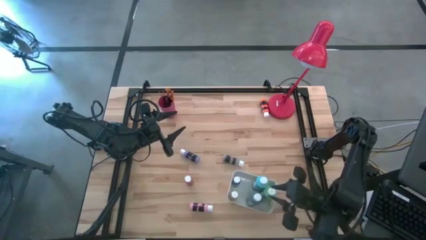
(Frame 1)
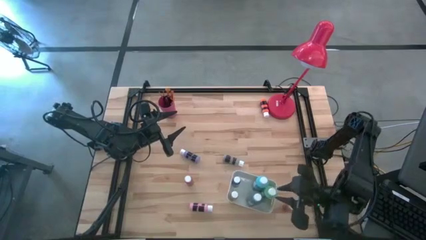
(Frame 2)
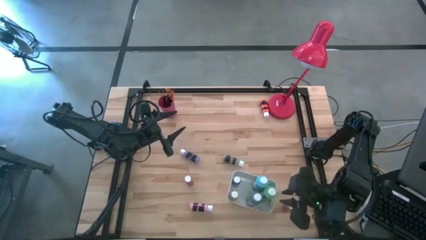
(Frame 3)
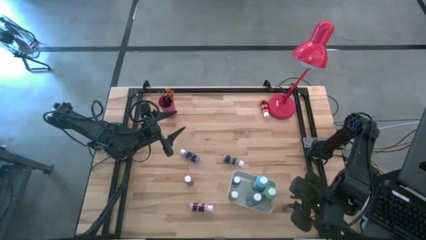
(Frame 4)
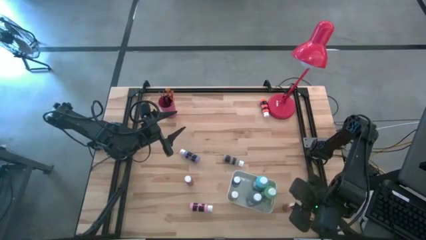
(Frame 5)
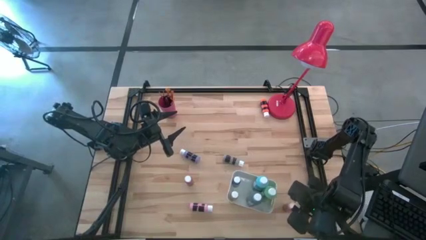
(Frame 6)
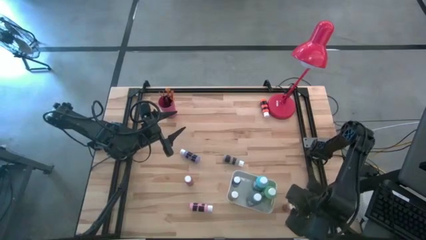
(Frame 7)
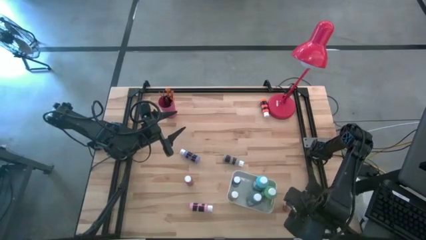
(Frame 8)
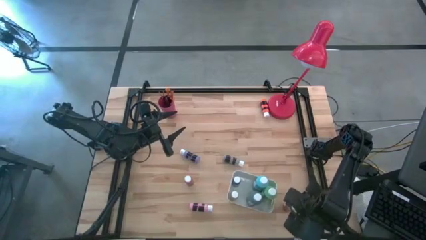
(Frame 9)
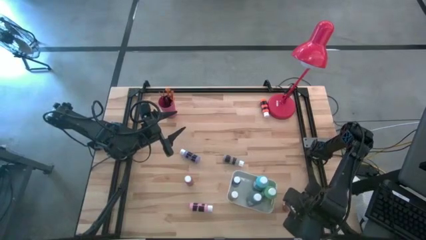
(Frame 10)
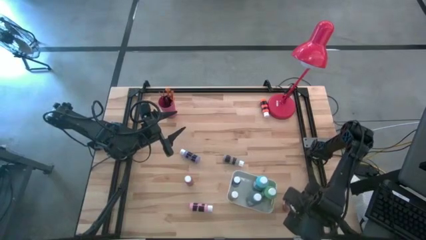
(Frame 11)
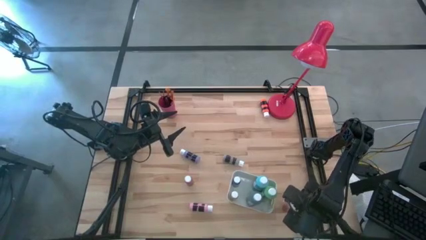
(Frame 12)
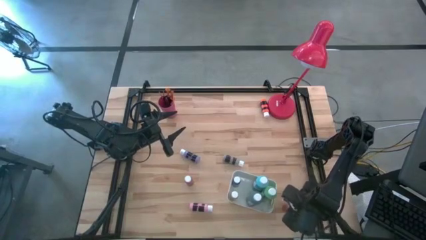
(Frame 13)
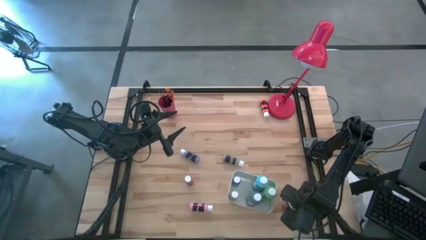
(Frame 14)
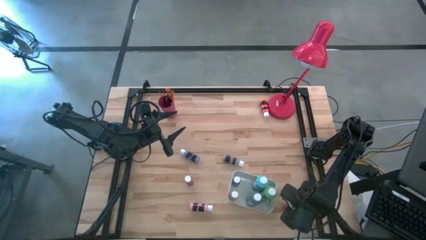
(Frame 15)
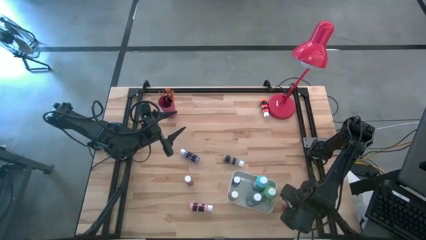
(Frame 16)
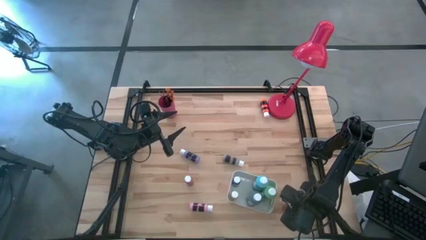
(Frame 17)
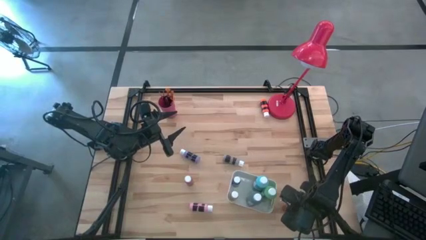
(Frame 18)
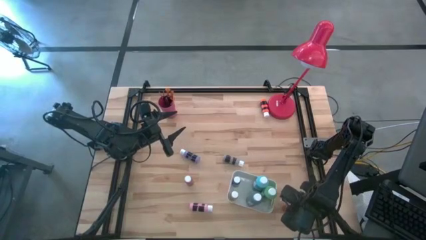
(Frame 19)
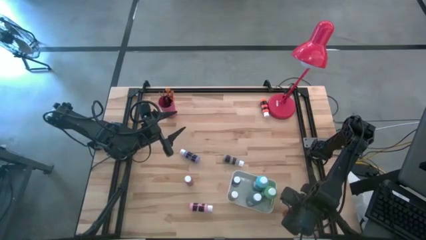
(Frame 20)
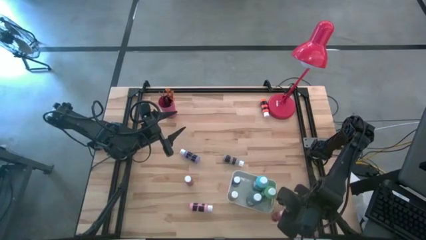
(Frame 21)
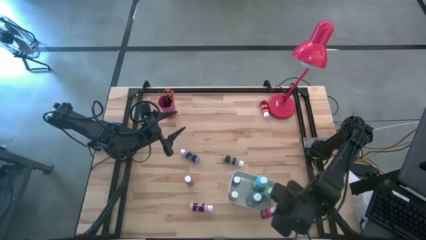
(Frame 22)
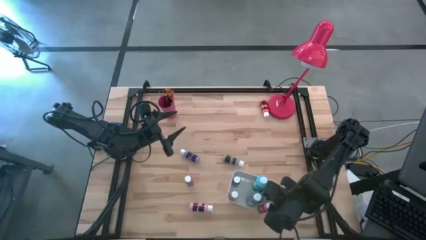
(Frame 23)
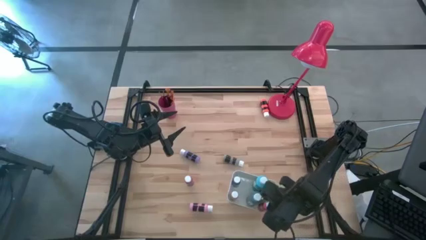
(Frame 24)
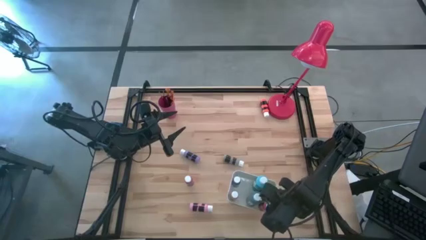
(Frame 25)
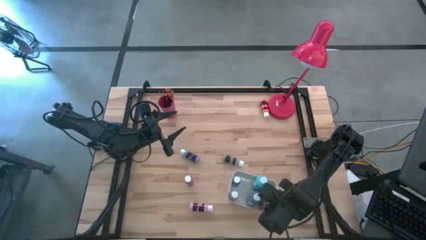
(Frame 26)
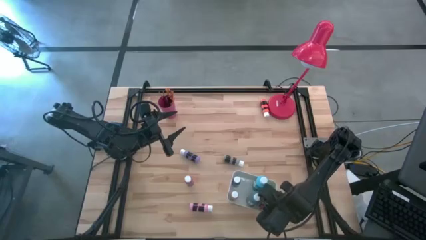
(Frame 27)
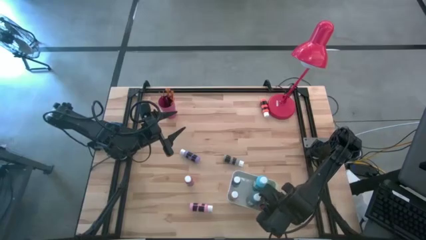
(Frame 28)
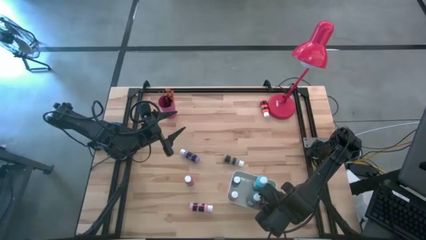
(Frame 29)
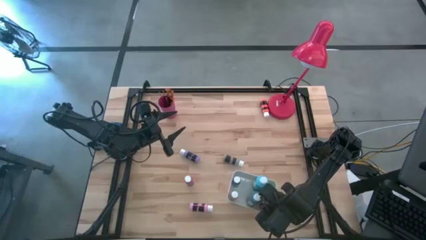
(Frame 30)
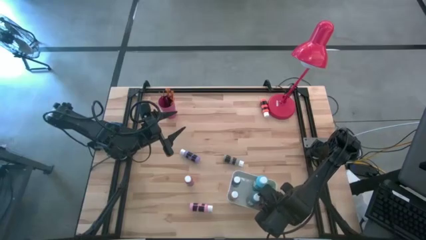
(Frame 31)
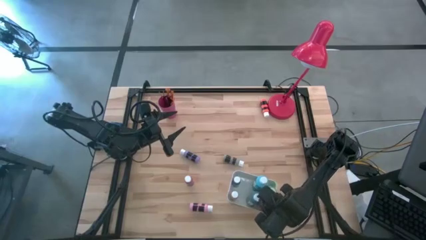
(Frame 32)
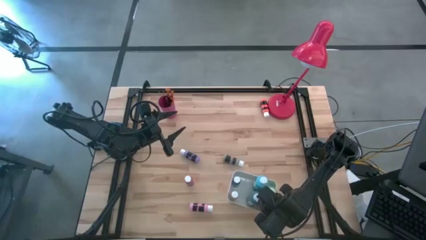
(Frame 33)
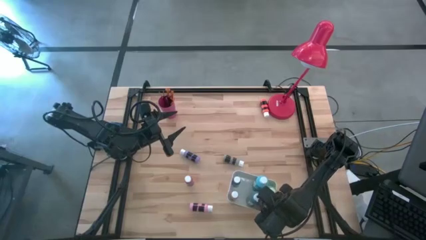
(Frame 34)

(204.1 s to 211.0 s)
Task: Pick & Place Paint Supplies
Put the orange paint bottle into the white bin

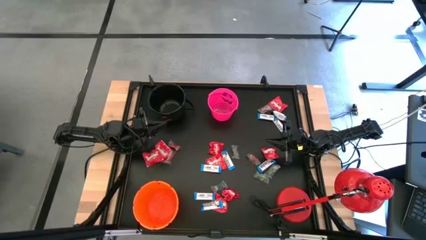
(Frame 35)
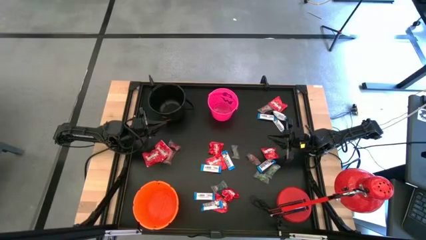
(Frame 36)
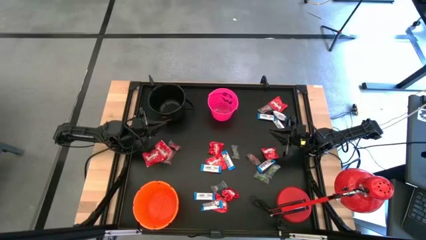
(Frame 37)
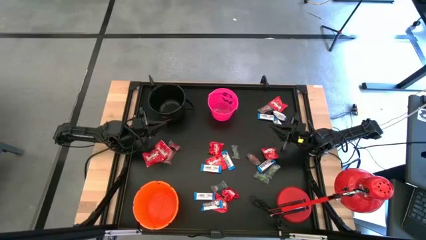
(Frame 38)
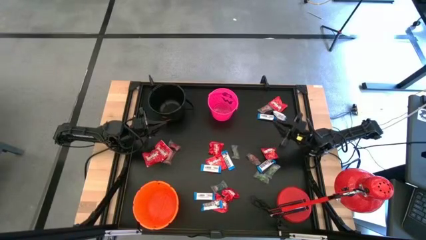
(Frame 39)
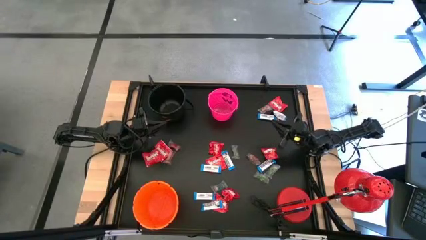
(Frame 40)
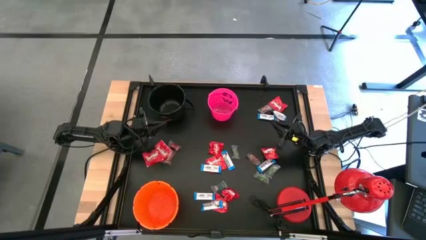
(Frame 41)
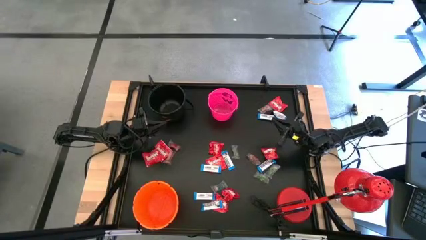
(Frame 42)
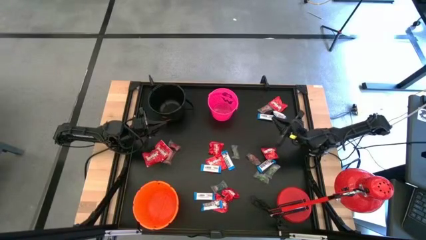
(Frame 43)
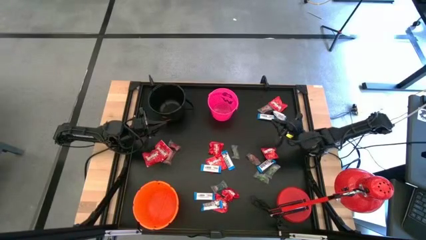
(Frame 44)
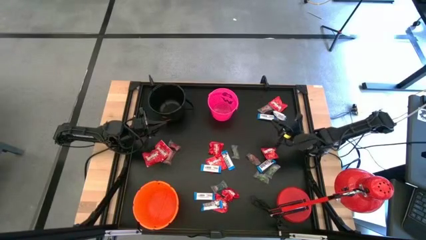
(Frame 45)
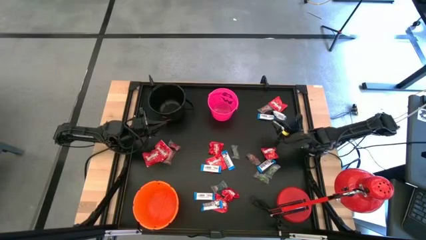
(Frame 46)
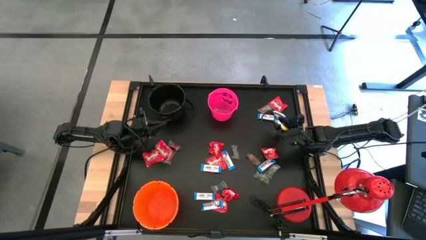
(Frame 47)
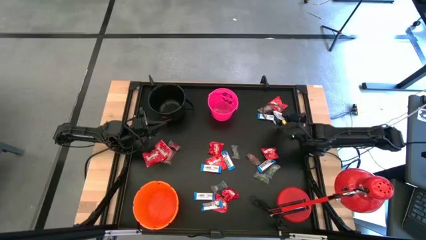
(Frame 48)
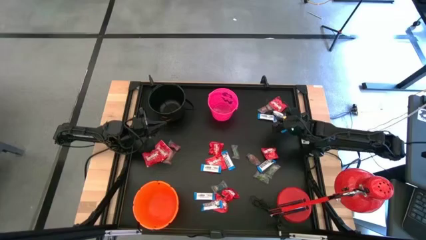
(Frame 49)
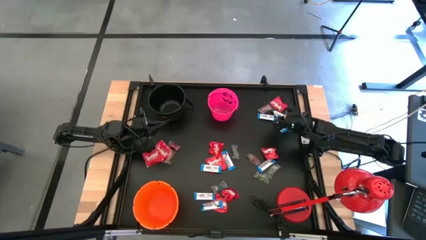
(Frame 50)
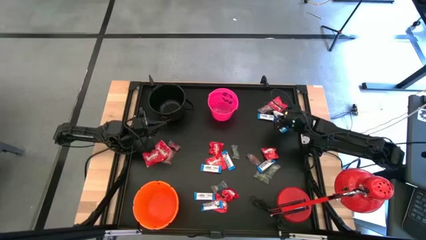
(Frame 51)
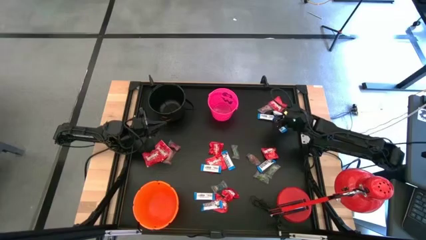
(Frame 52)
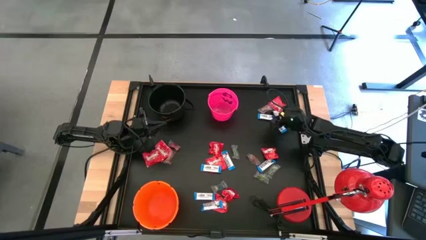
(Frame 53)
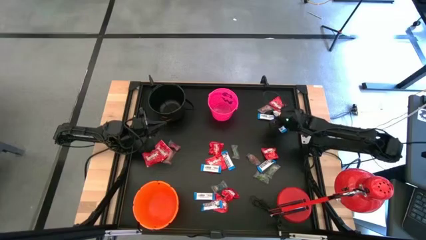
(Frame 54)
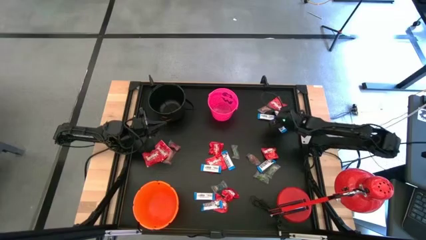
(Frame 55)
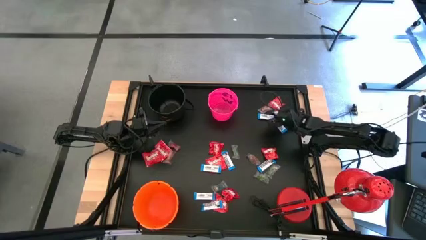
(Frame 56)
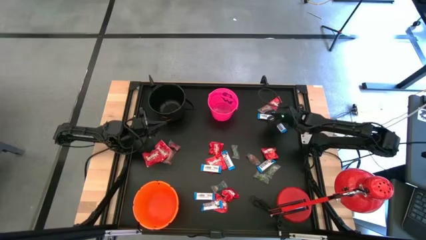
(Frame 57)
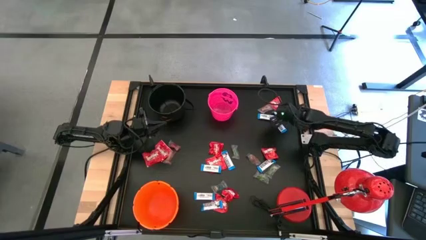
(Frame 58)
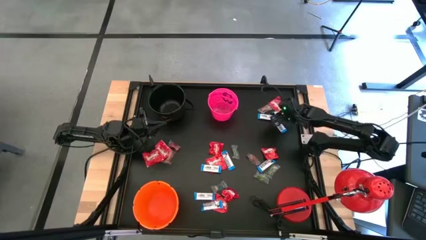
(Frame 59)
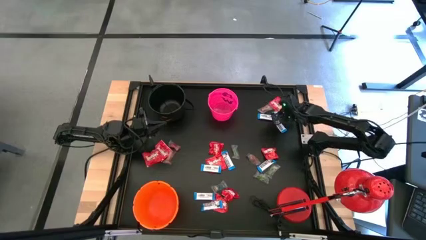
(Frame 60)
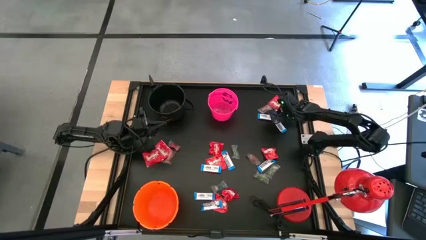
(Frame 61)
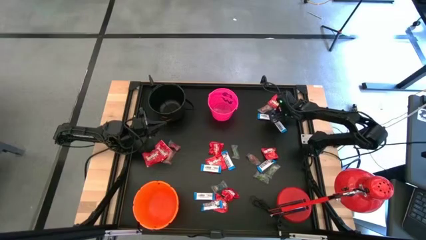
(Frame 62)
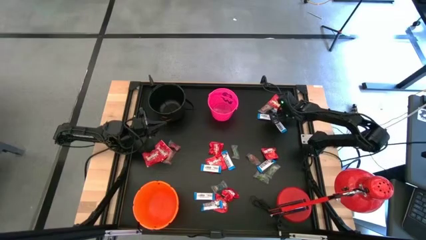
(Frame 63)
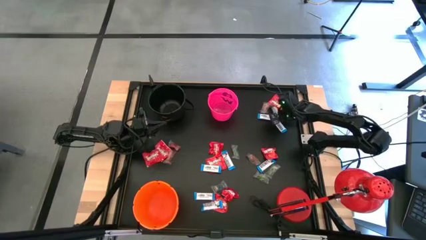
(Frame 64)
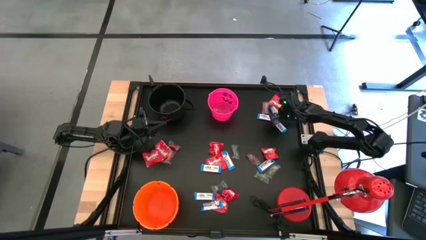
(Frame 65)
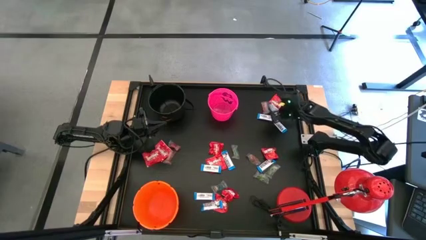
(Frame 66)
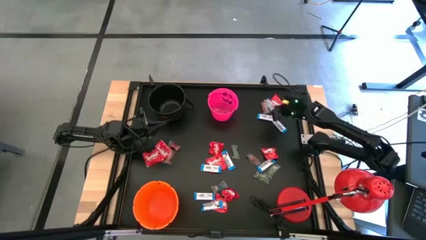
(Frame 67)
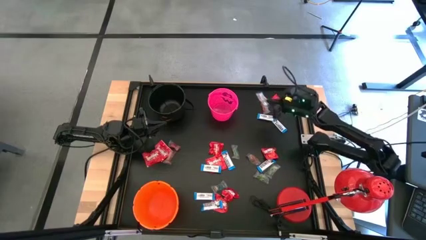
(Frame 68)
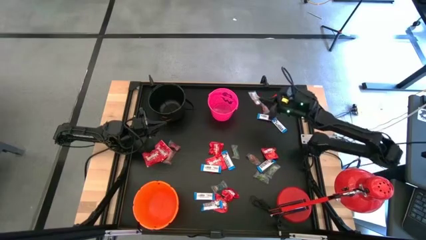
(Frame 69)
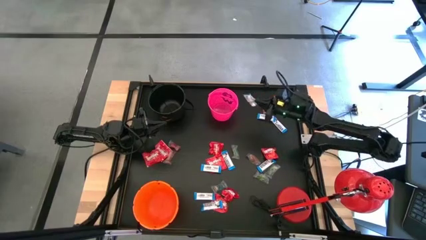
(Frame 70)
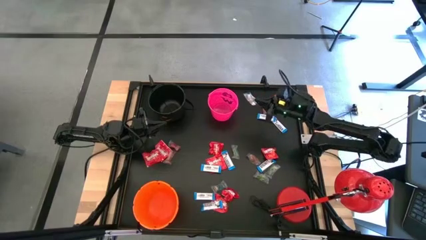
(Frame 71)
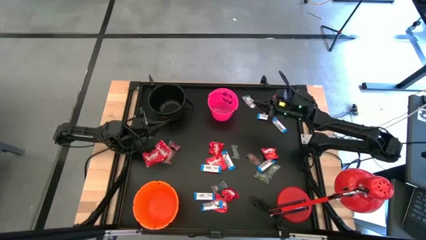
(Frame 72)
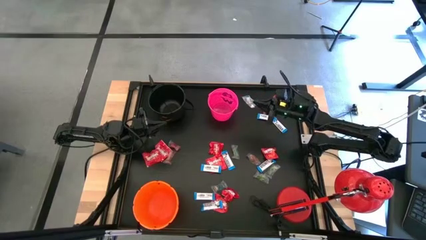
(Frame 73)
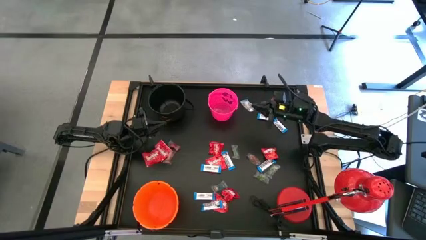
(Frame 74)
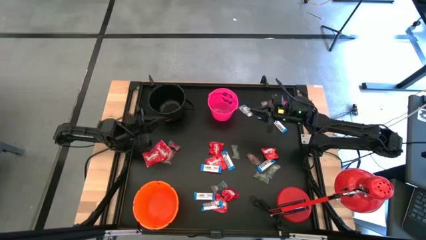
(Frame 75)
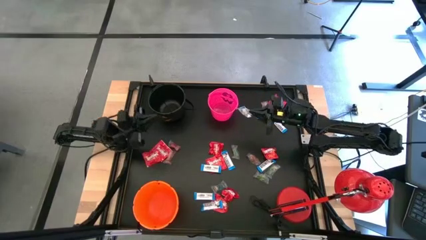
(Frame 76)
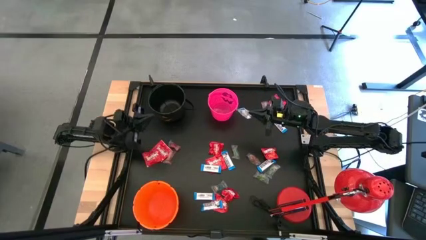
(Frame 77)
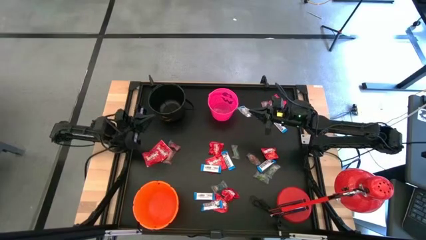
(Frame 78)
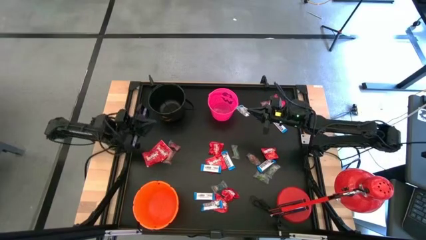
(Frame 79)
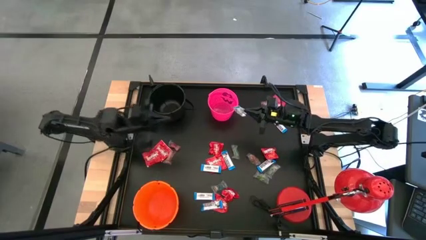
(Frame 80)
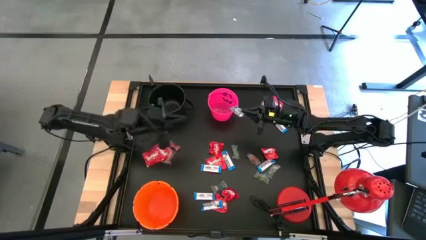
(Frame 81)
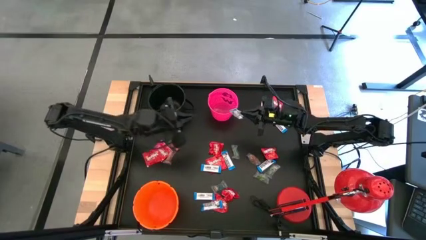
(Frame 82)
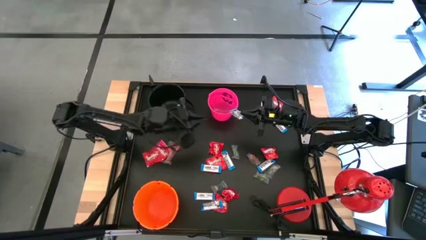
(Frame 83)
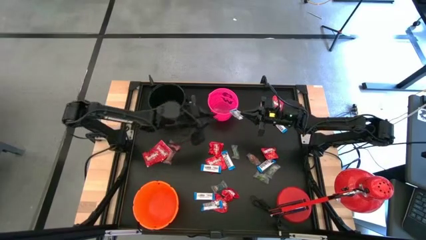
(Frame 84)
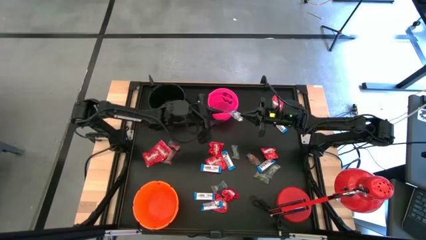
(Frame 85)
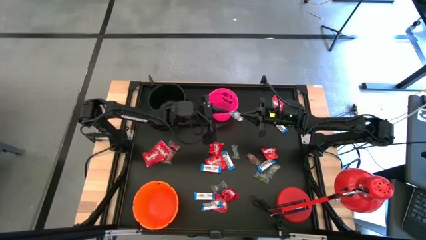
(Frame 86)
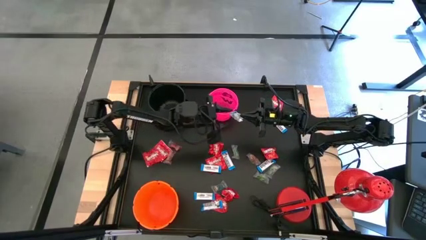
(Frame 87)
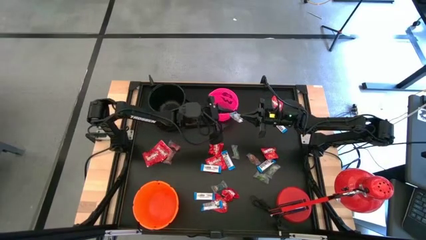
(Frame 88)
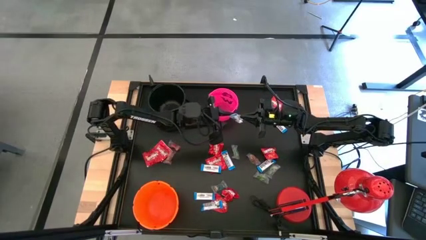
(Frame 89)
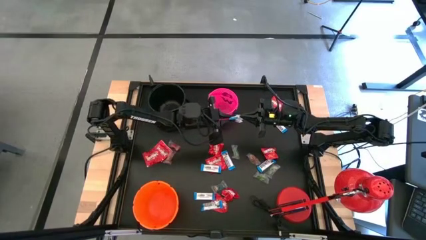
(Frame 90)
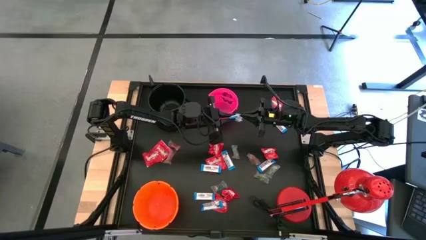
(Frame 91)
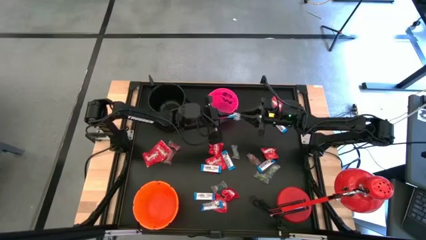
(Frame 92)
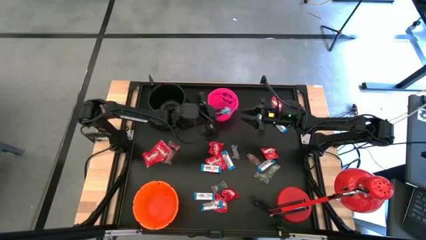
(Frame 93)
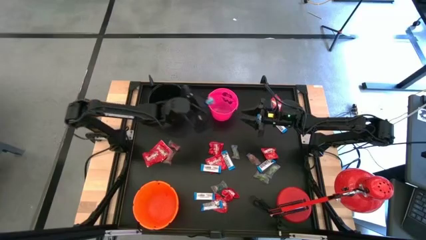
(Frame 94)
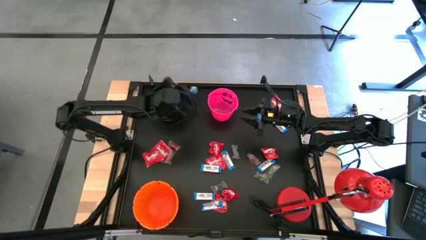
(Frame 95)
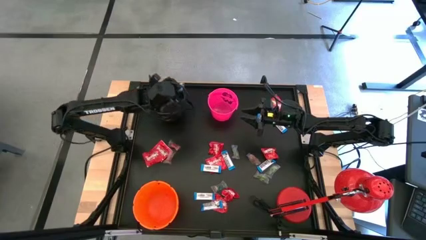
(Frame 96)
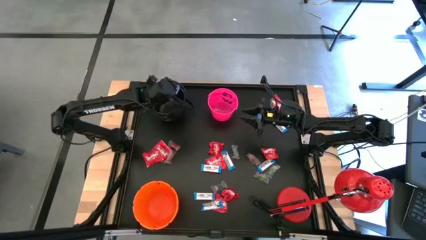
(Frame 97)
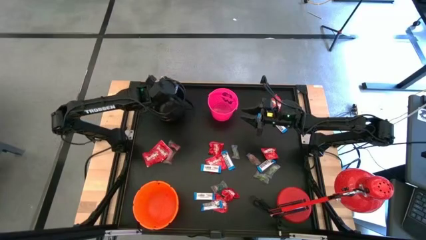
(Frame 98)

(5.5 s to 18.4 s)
Task: Organize candy in baskets
Put the white chocolate bar into the black bucket
